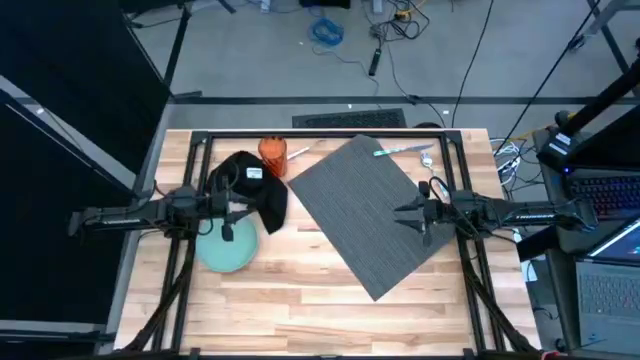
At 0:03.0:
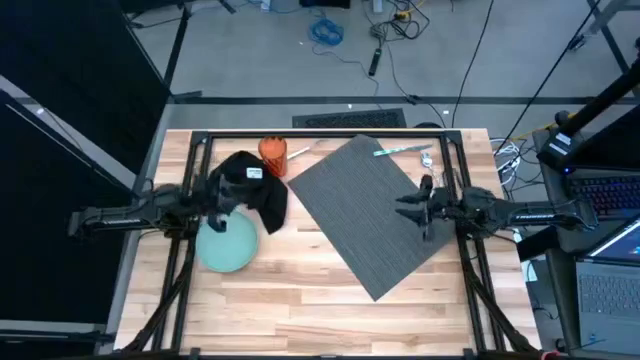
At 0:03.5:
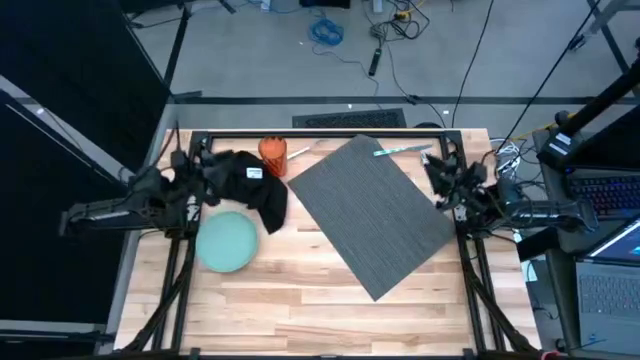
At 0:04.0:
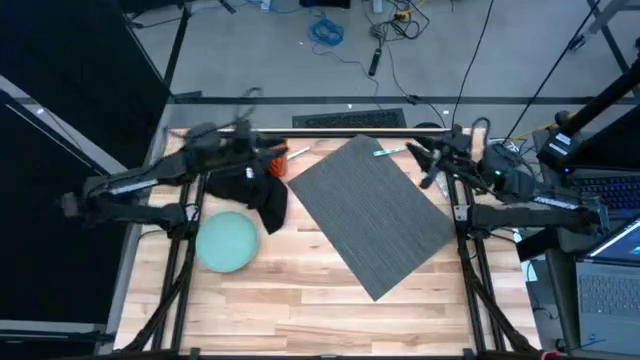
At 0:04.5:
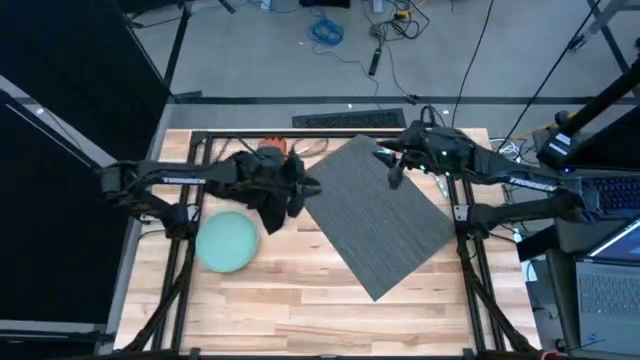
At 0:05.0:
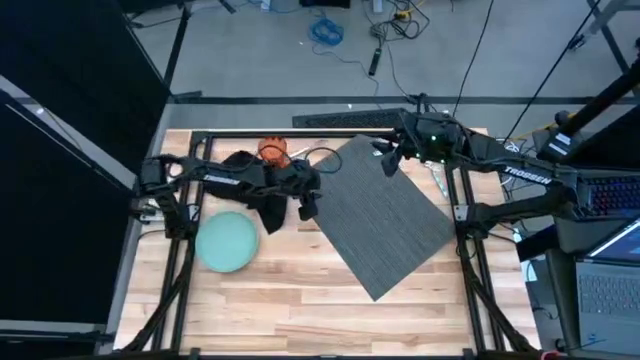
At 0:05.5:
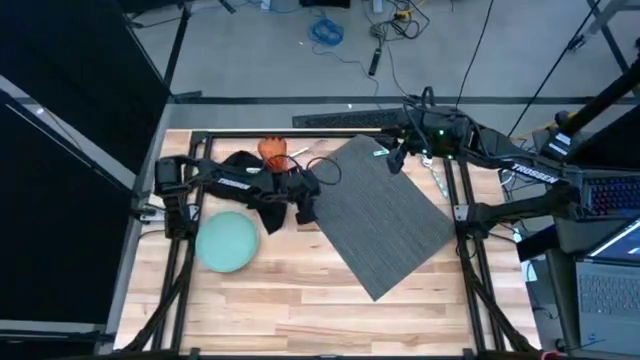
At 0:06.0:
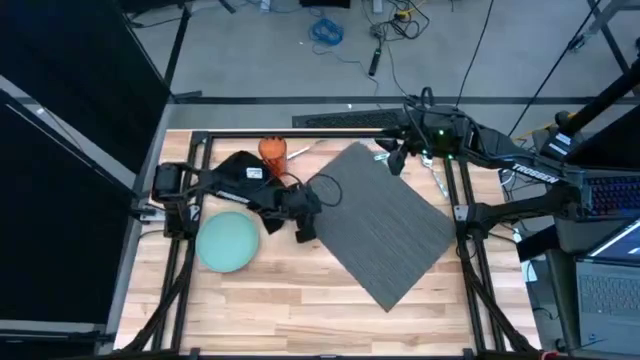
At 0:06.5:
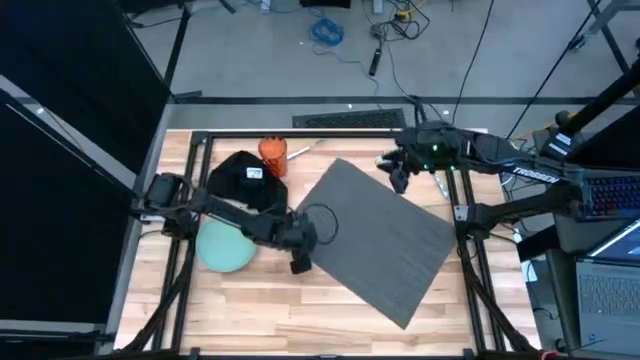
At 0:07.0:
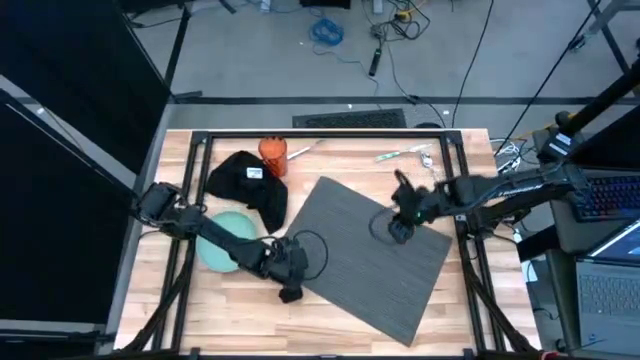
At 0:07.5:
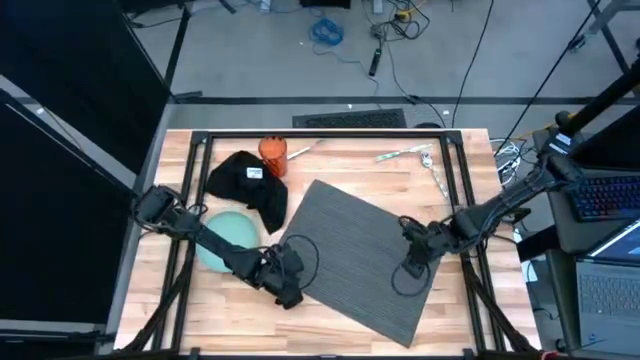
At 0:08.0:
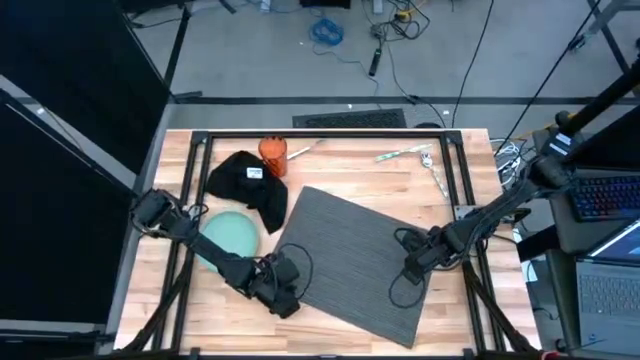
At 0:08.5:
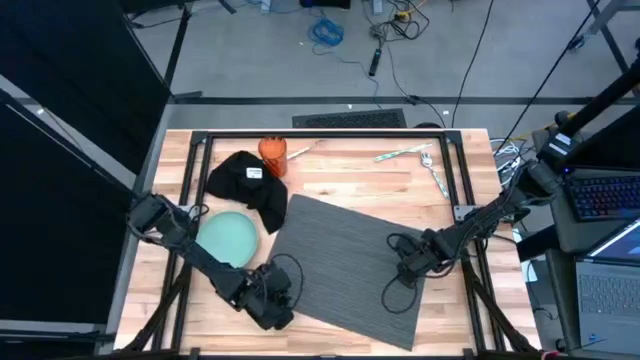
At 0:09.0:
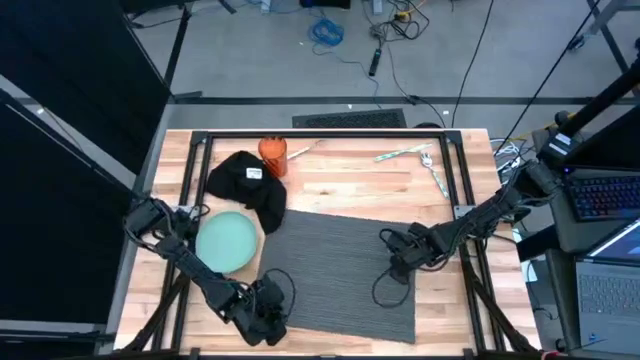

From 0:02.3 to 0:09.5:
Task: Set table place
Move the gray mat to the center

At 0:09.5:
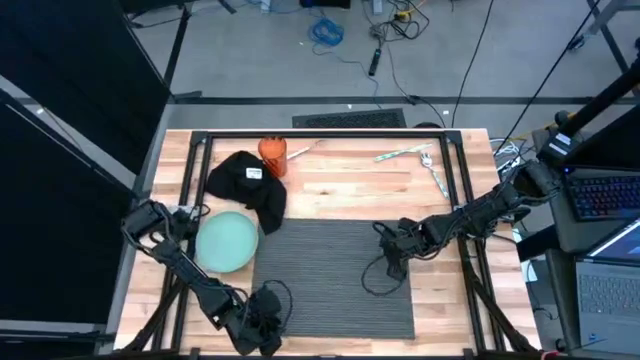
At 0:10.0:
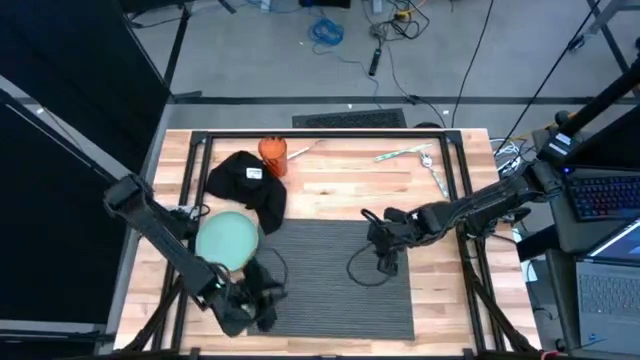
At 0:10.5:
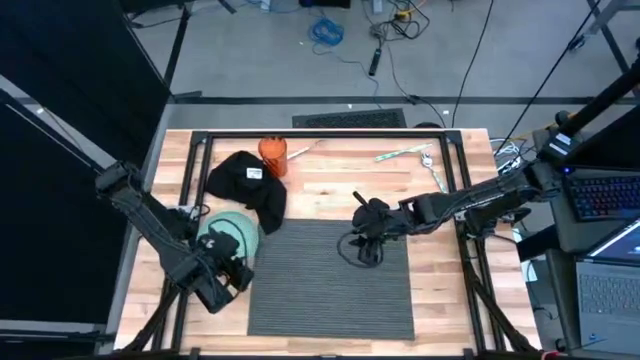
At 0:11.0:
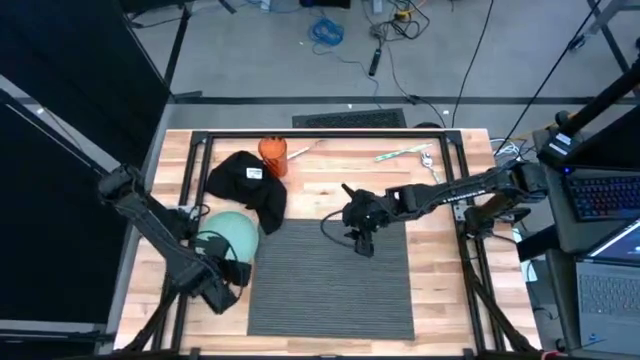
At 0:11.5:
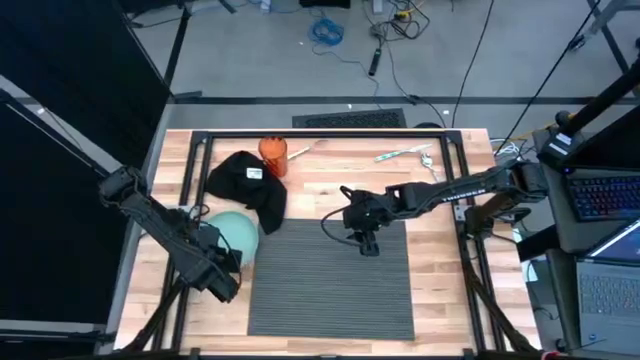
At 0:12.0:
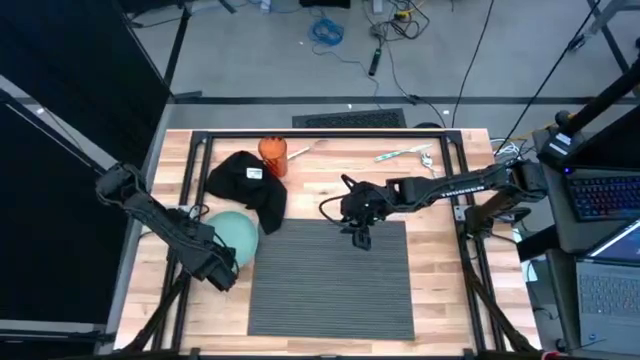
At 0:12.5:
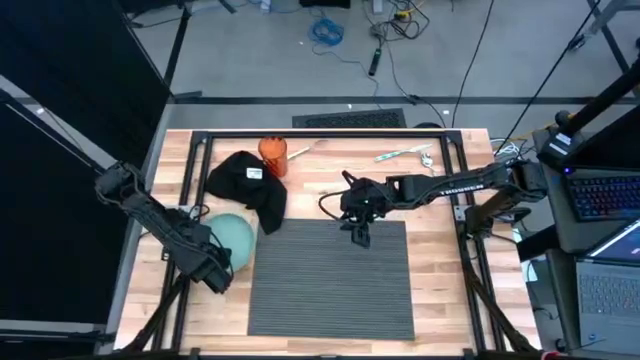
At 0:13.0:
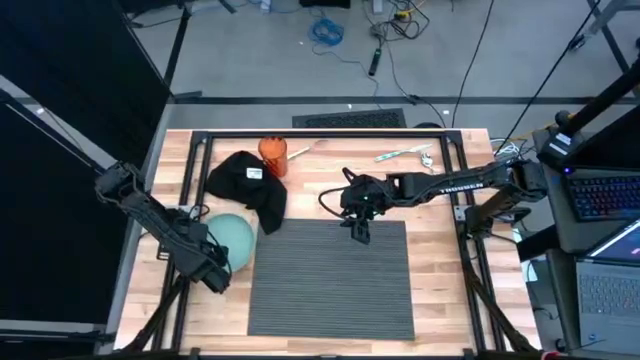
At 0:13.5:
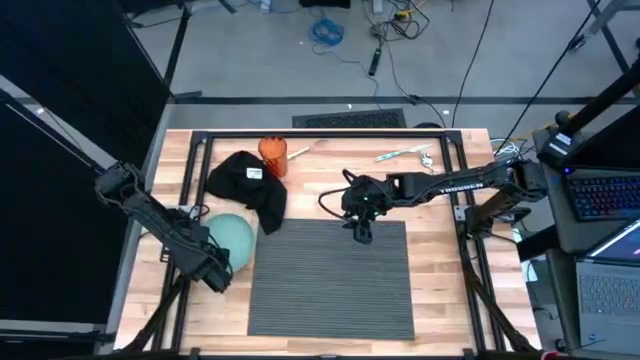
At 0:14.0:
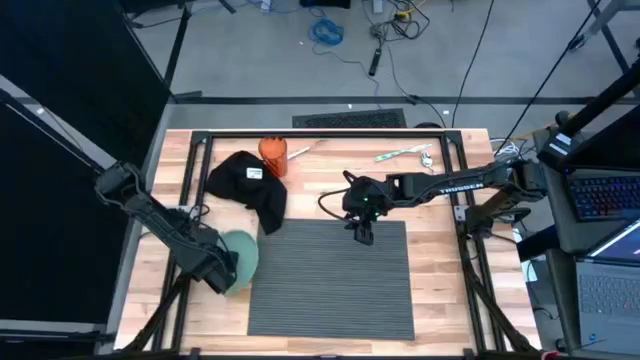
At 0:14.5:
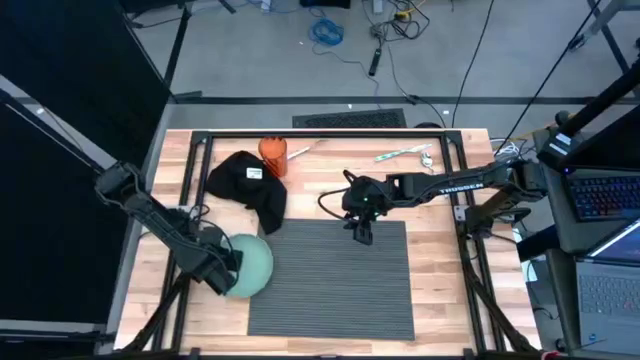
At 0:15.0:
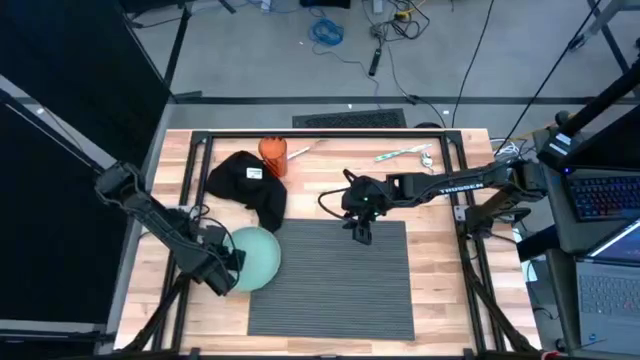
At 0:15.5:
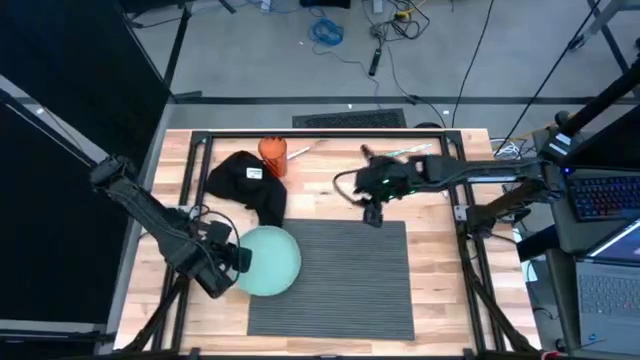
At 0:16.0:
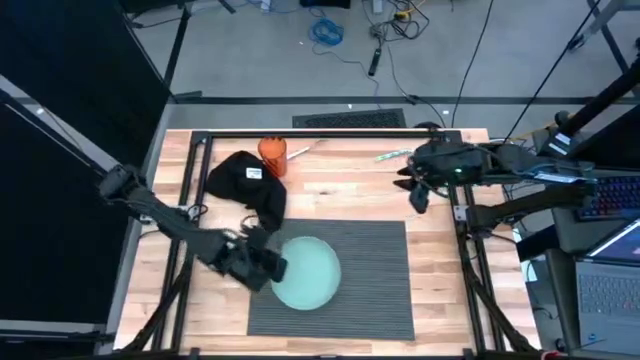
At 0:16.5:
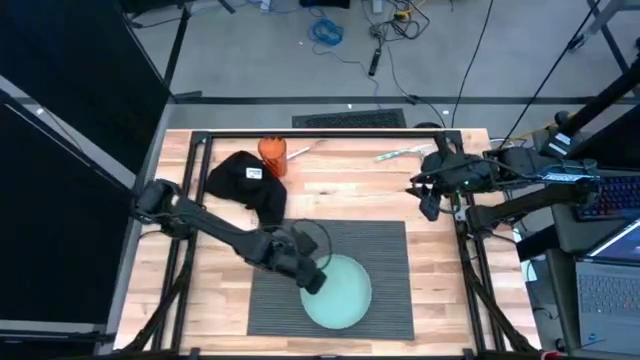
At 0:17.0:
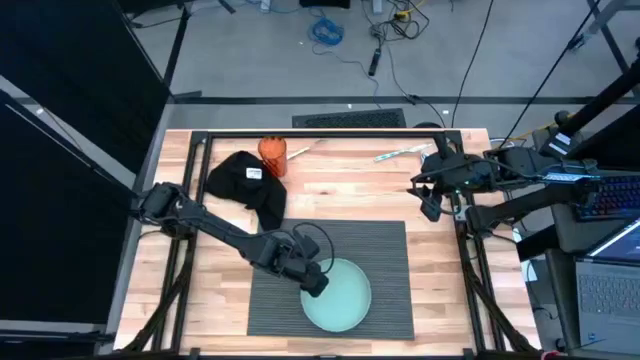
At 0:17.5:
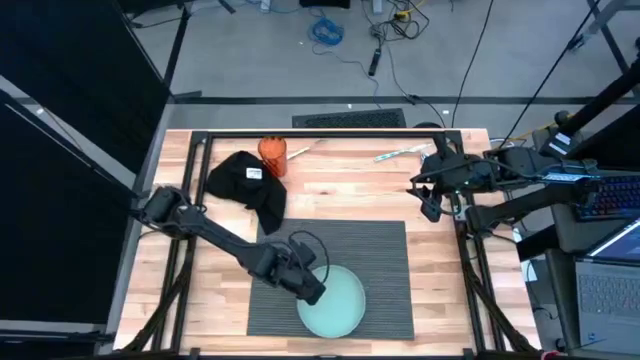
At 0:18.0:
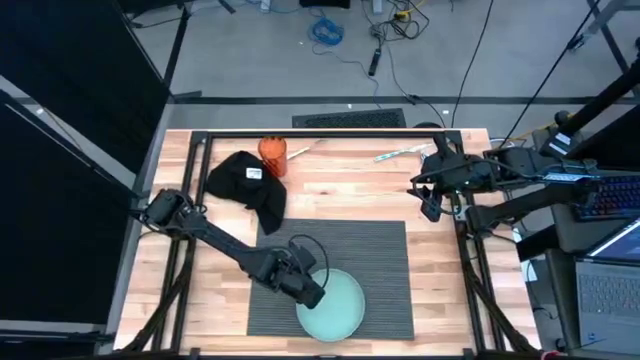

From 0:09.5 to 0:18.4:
Put the green plate on the gray table mat

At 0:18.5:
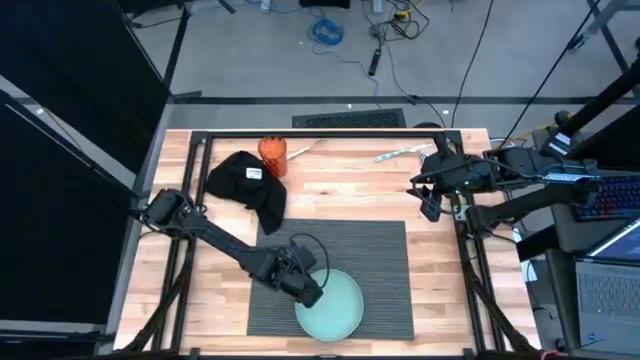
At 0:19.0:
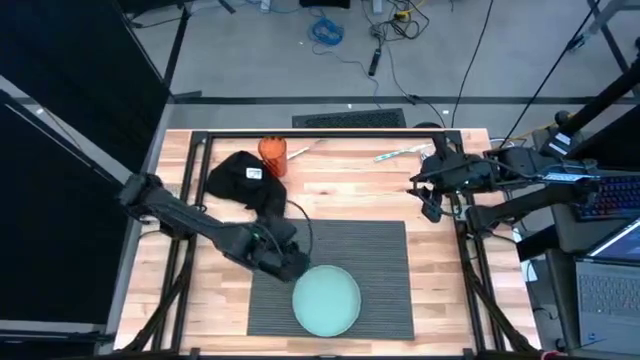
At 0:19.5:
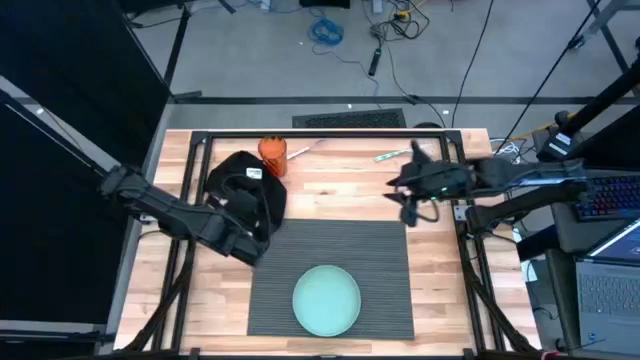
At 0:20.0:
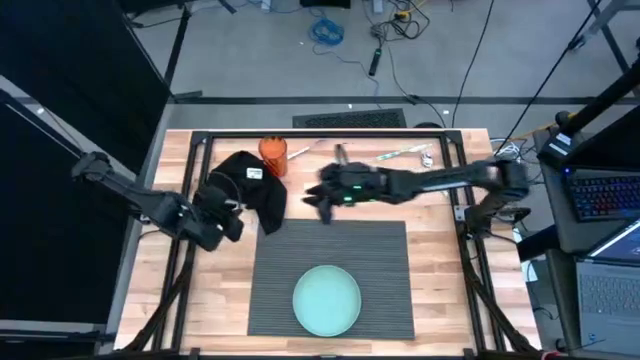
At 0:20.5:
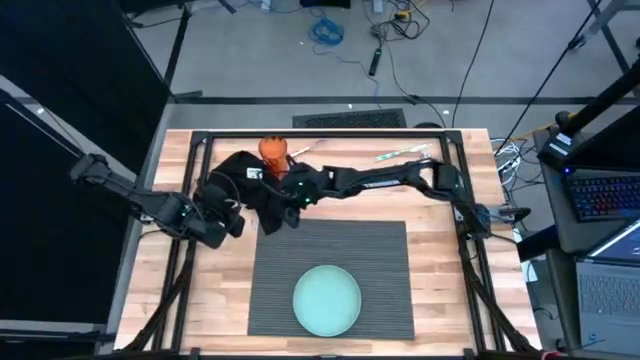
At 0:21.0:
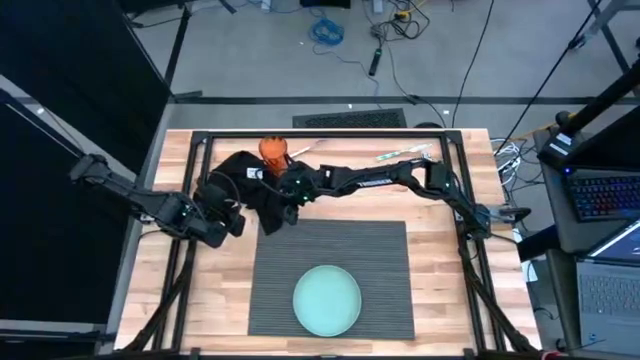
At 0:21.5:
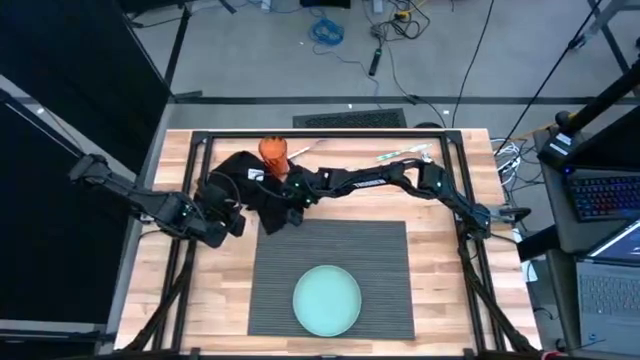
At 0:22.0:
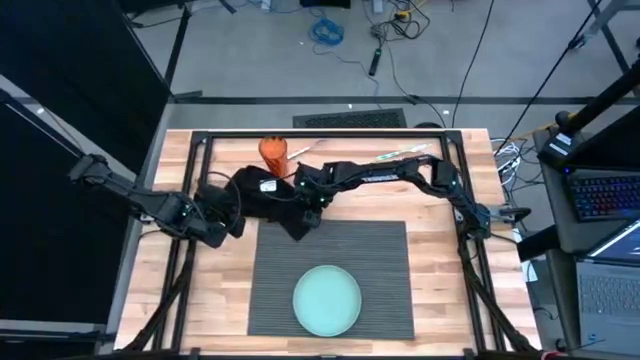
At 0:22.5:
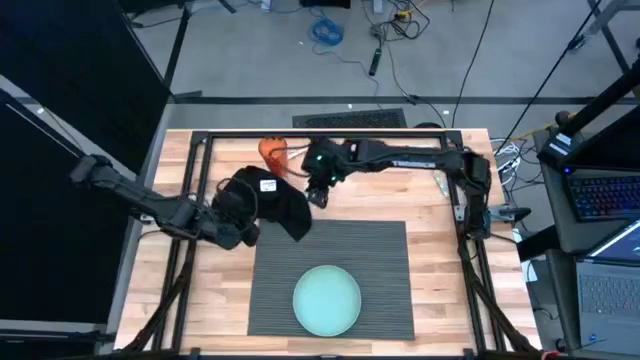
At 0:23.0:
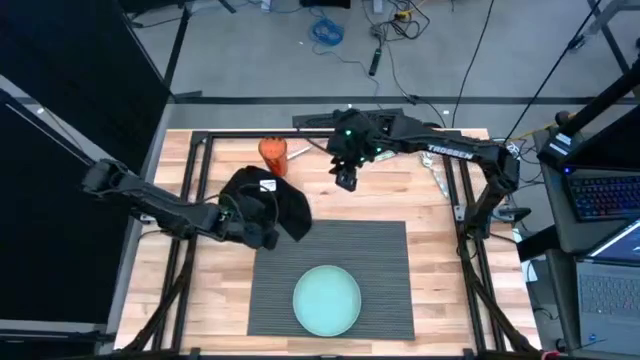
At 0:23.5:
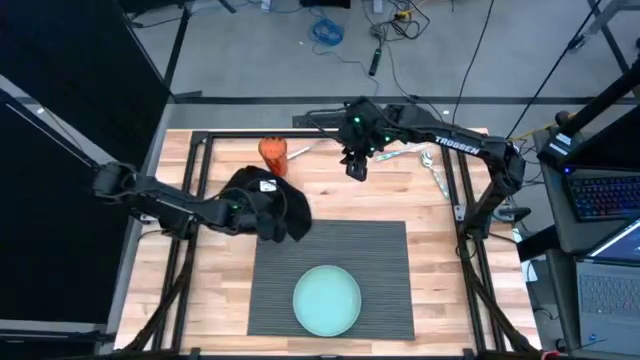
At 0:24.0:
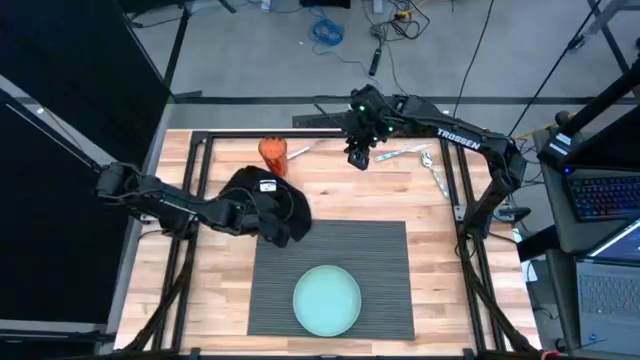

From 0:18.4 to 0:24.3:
Fold the black napkin
